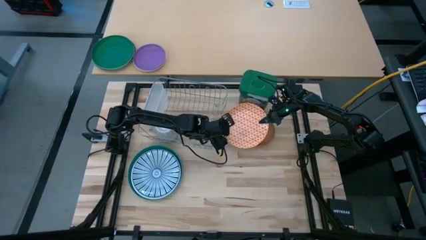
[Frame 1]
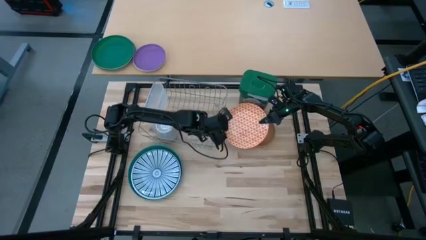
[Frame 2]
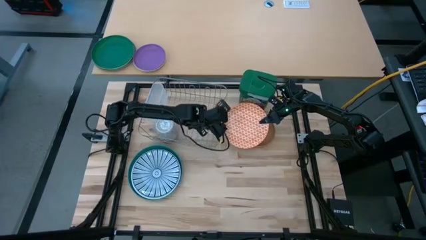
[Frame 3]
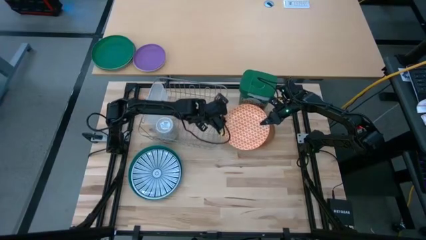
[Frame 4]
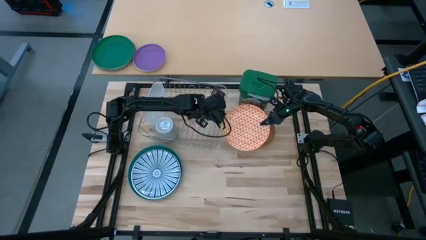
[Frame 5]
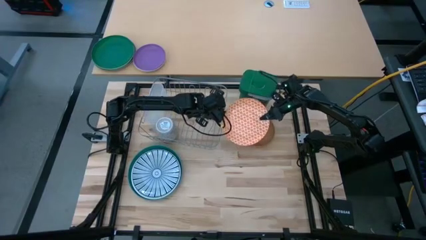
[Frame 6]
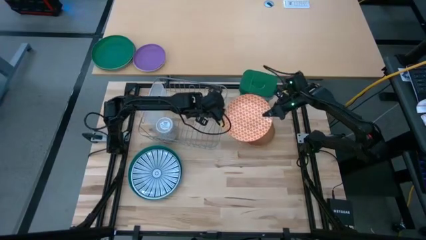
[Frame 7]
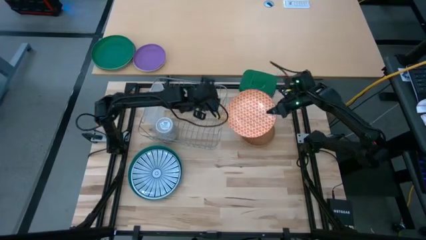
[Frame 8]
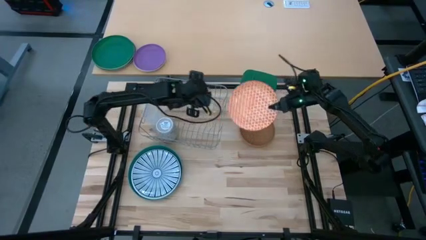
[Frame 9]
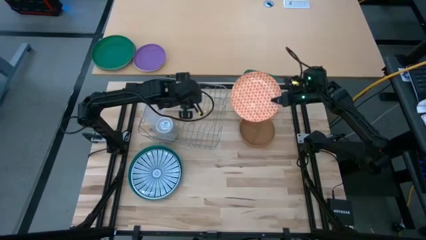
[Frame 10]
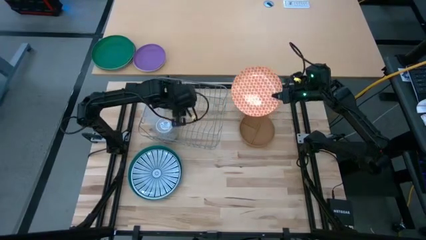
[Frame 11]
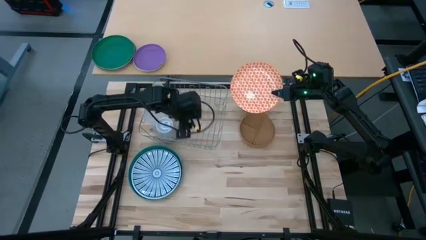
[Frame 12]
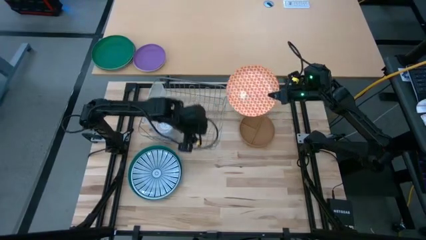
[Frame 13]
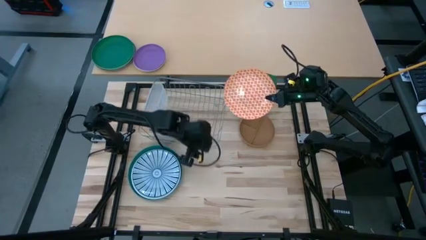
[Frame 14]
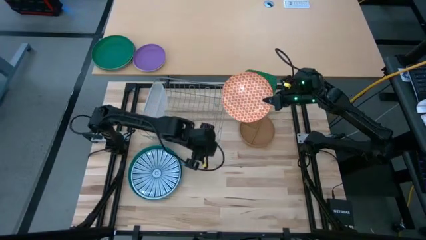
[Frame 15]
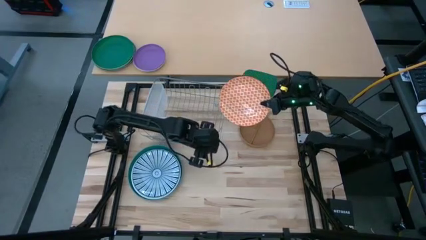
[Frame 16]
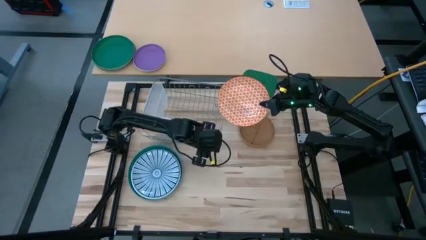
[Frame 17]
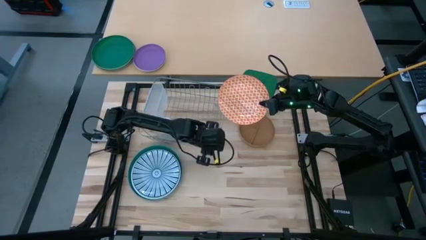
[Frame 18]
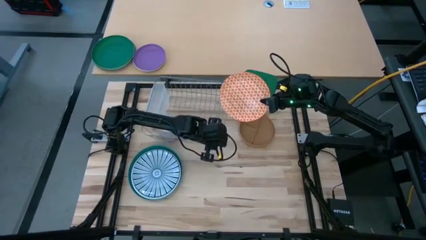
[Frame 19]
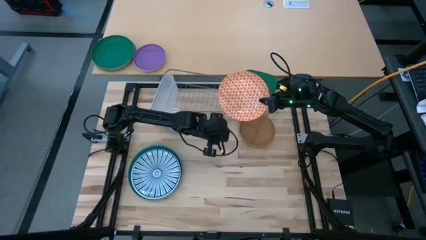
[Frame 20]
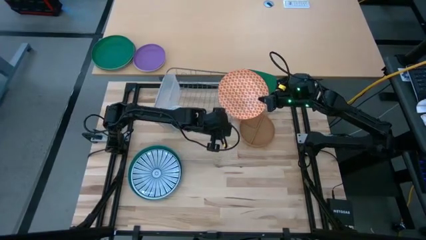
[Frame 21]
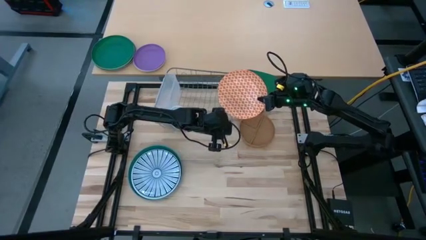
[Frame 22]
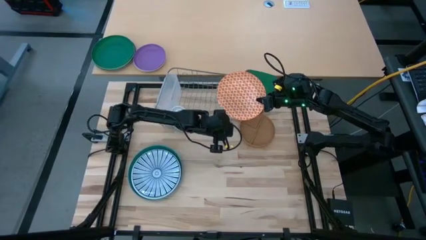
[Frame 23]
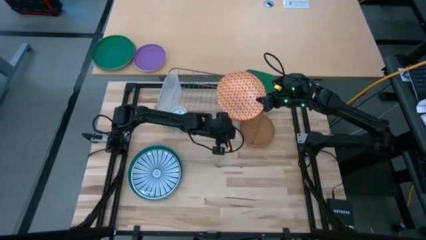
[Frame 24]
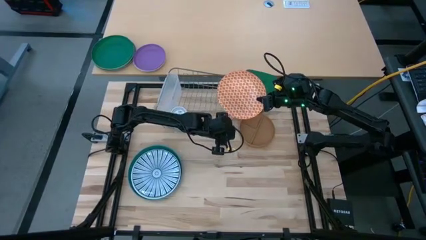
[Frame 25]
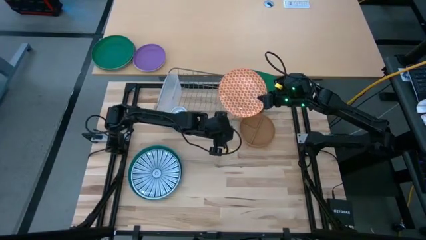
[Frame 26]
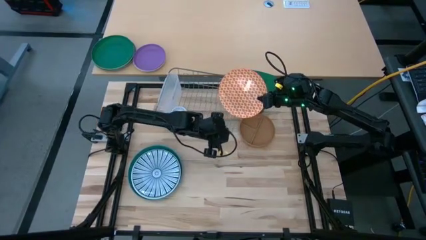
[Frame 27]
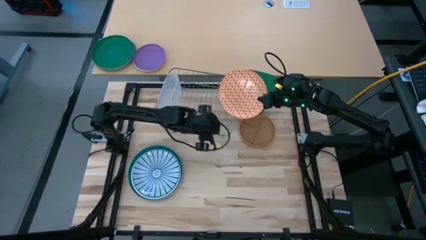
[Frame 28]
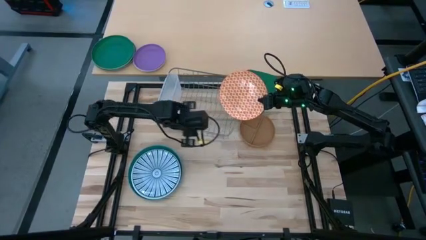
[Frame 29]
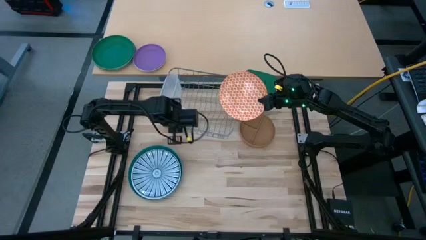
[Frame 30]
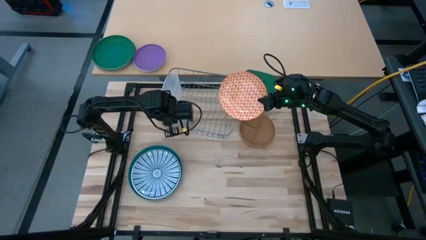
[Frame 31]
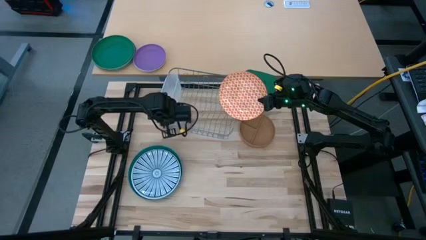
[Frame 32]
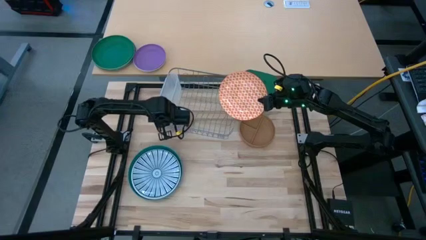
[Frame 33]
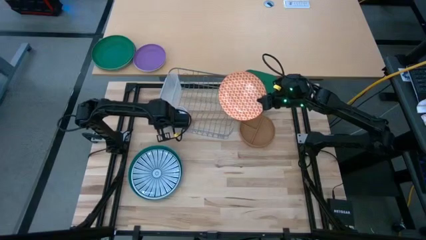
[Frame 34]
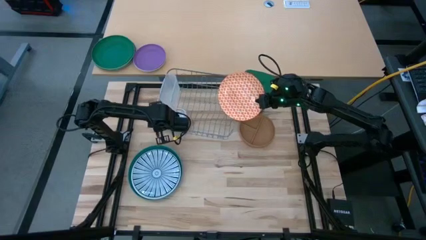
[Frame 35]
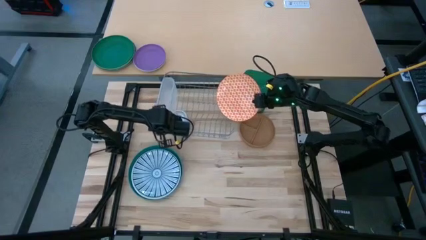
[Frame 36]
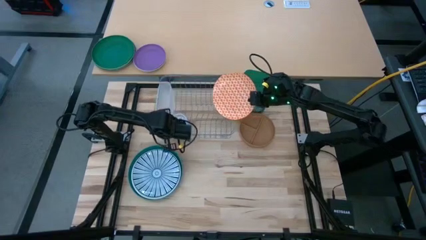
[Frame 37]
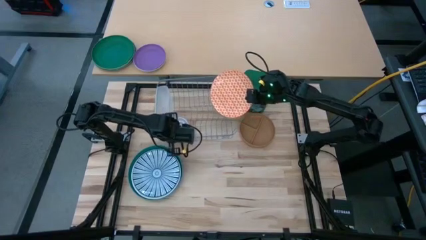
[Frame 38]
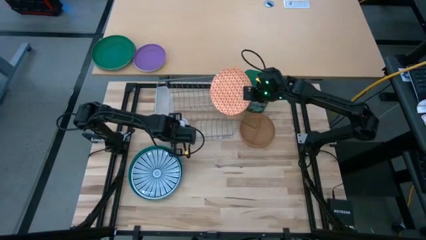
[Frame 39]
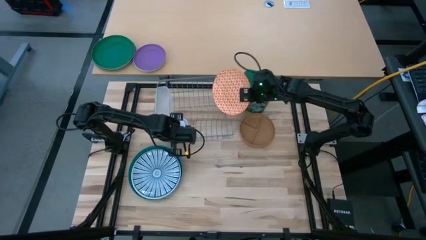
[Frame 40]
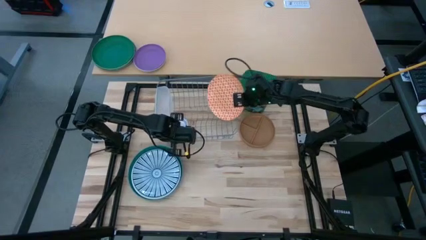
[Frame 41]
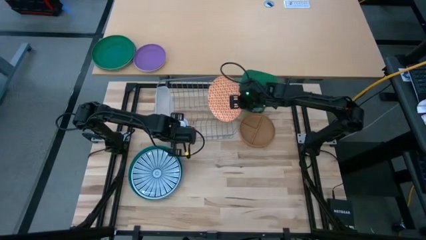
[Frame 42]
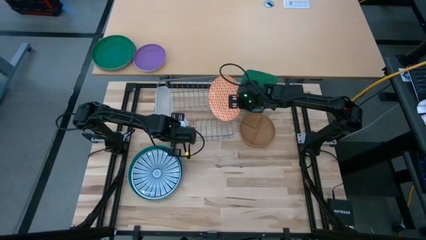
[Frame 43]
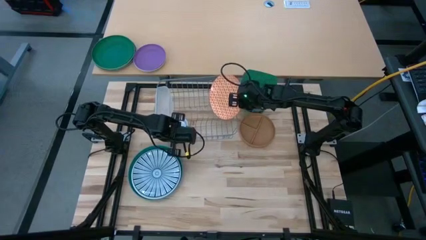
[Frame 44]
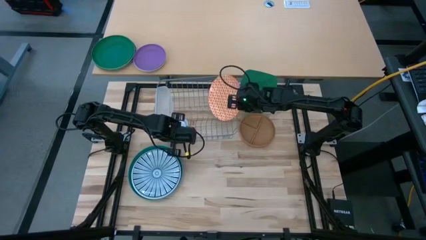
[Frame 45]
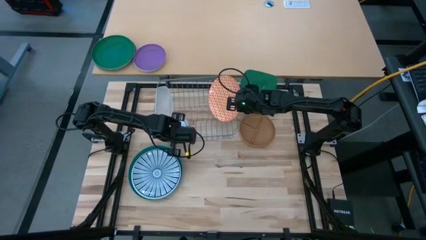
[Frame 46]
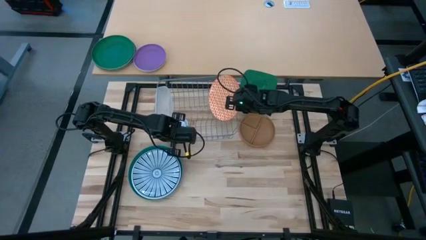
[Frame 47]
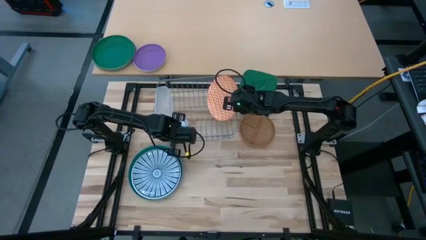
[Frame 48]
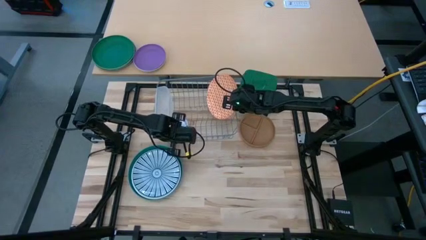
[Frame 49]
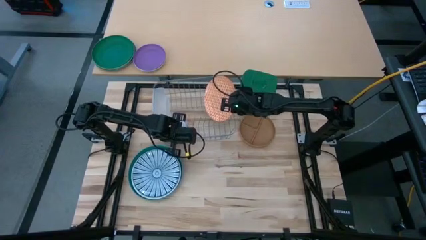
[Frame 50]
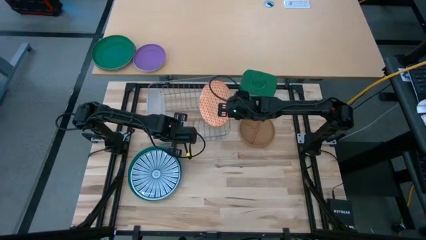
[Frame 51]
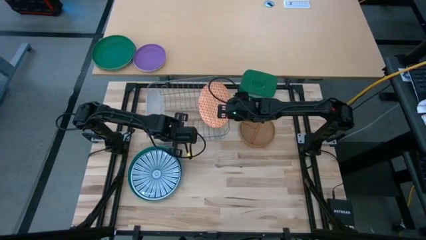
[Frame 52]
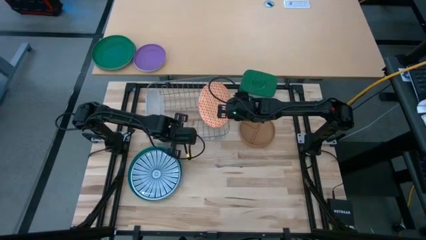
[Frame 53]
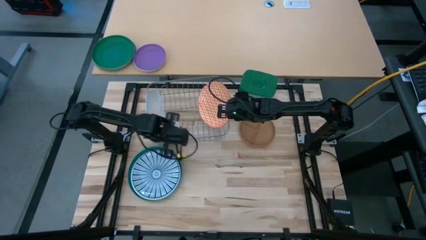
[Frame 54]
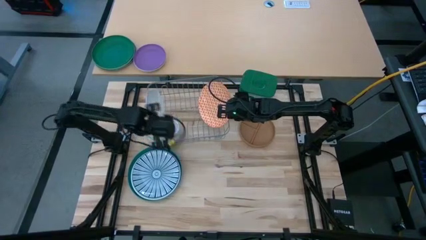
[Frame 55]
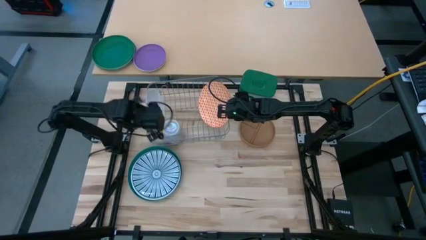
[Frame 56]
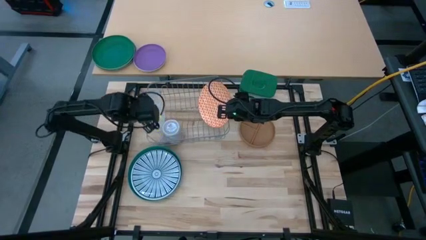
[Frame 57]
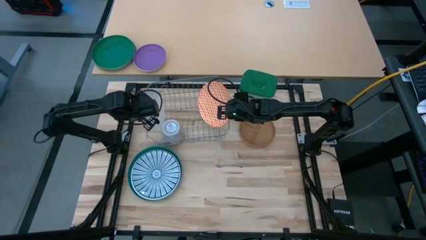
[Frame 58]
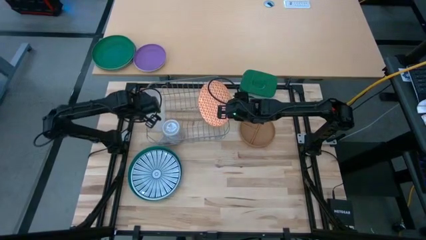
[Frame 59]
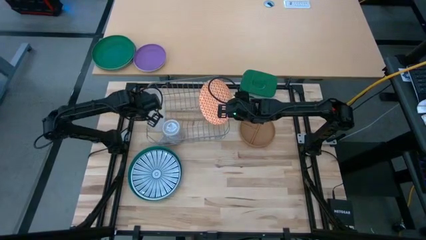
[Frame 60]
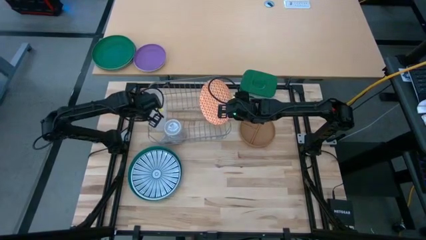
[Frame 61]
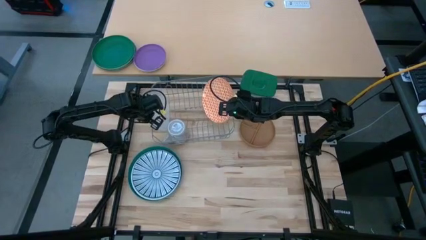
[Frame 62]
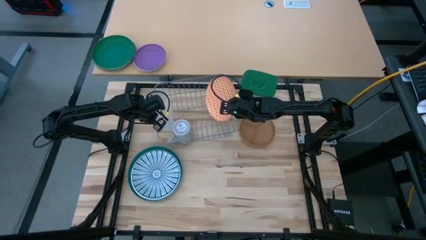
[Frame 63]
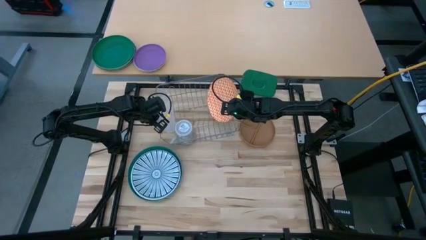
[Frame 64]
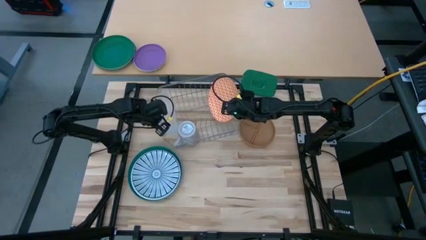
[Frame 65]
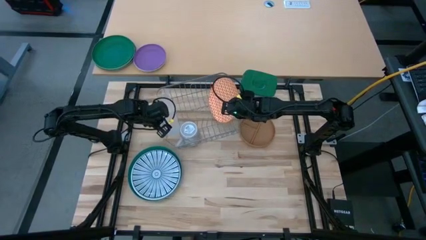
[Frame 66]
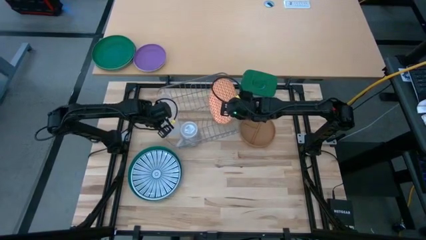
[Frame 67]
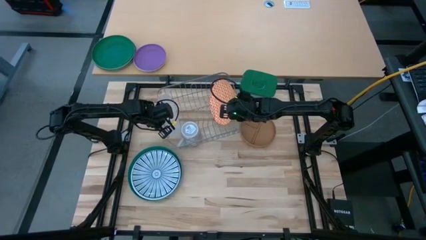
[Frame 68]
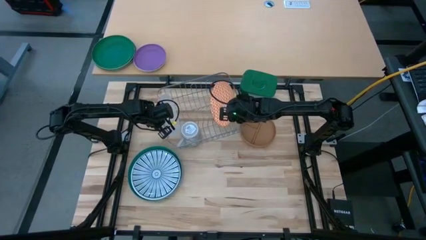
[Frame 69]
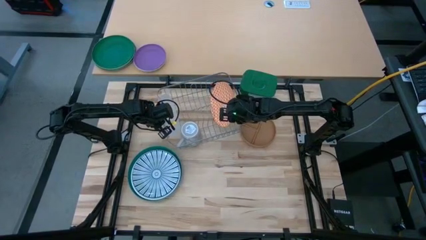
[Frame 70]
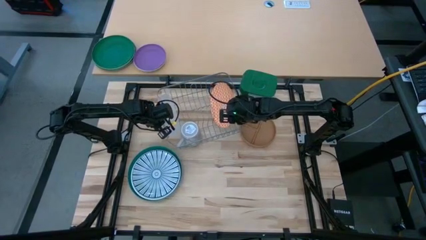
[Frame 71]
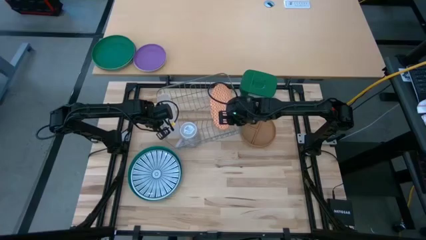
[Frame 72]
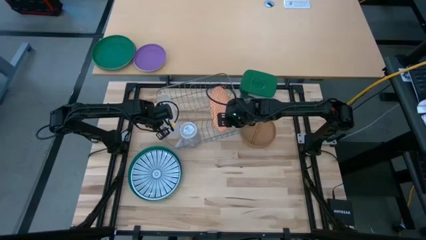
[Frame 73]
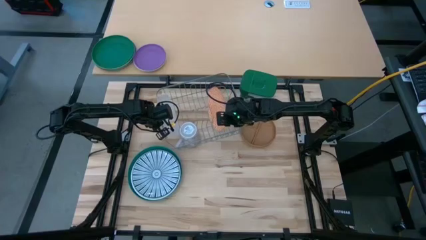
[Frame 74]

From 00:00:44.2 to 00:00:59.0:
Task: Sort dishes
Put the orange plate in the dish rack

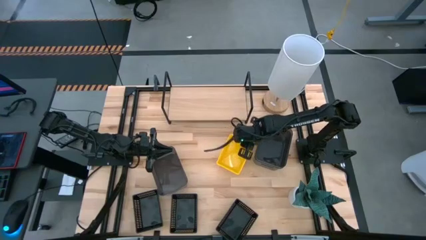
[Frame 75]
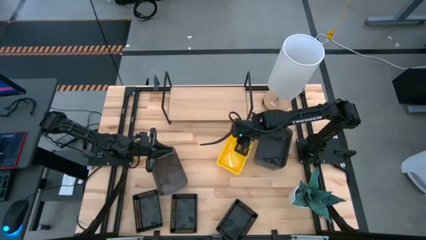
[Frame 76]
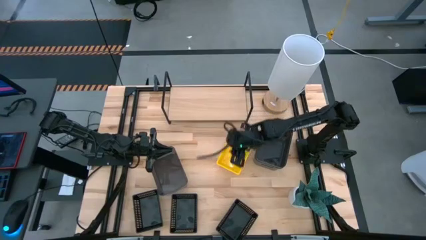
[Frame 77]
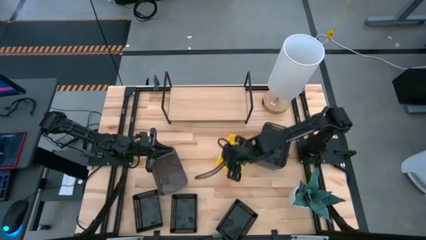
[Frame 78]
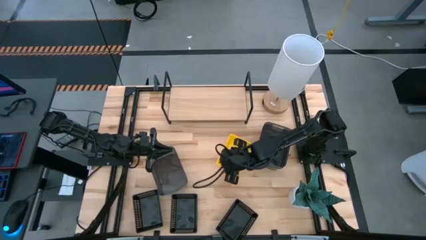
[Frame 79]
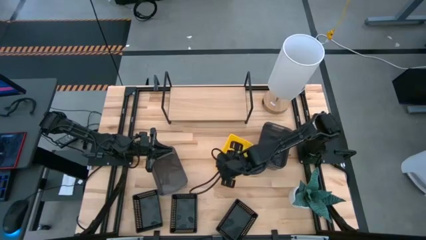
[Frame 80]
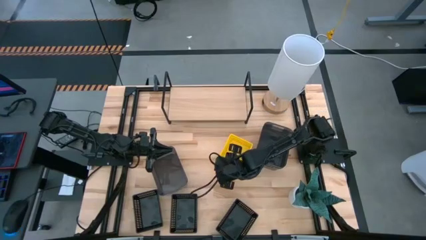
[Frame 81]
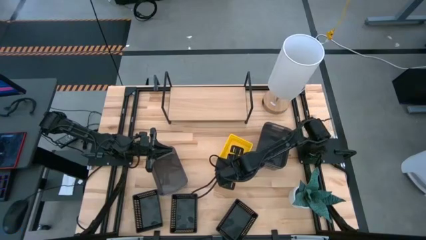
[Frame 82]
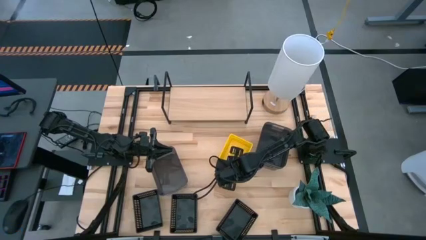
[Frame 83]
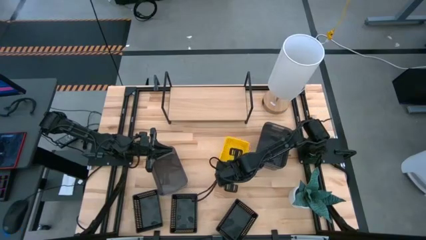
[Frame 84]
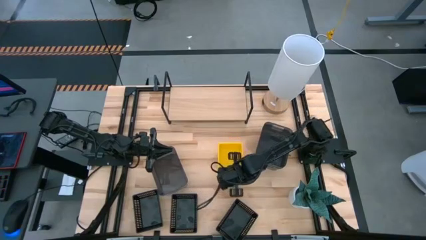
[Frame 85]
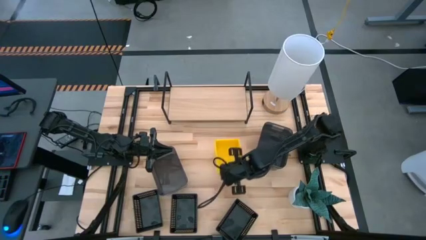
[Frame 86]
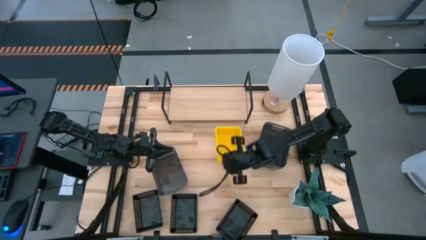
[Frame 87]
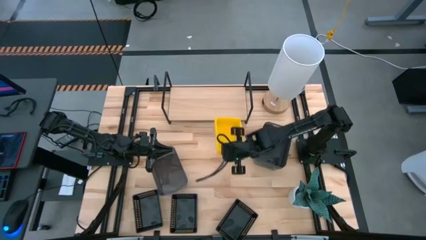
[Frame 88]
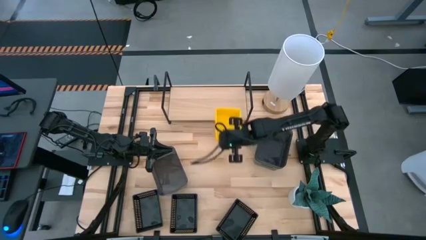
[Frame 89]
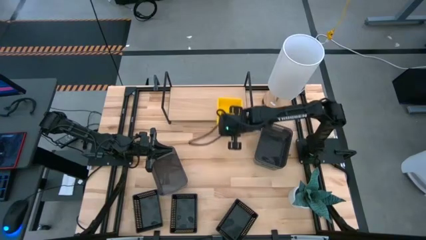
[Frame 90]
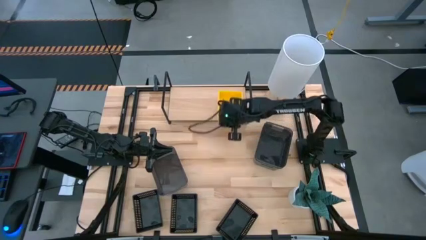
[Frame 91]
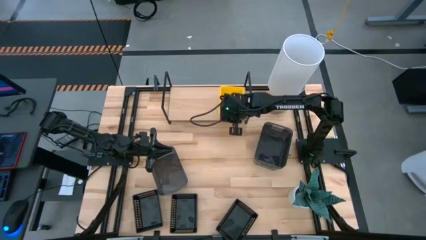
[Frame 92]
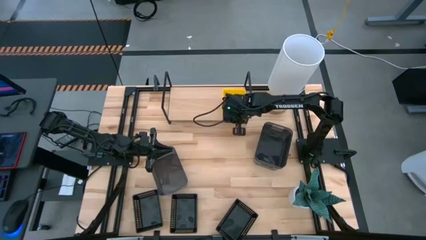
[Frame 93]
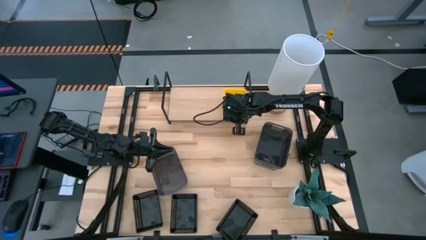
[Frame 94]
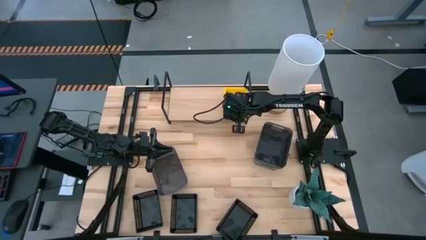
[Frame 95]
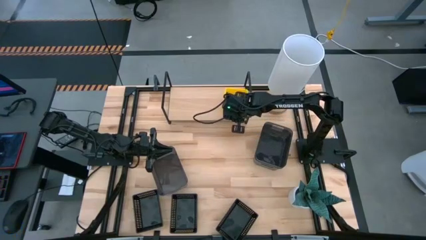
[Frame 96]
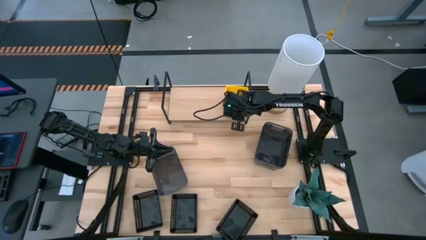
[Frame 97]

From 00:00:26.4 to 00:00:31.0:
Task: Stack baskets on shelf by color
Put the stacked yellow bins on the shelf
